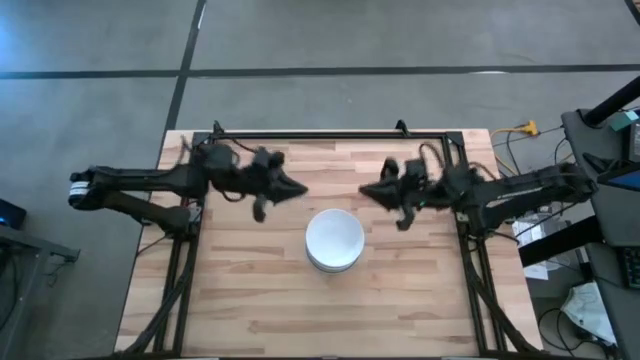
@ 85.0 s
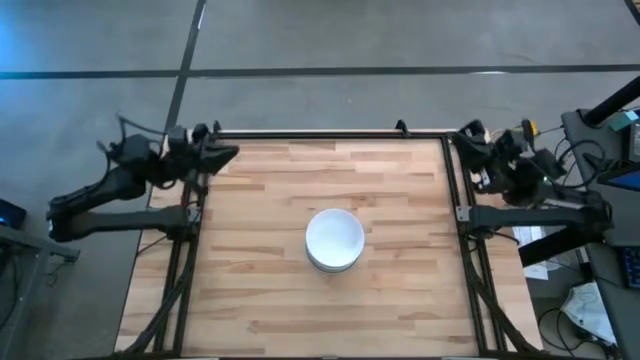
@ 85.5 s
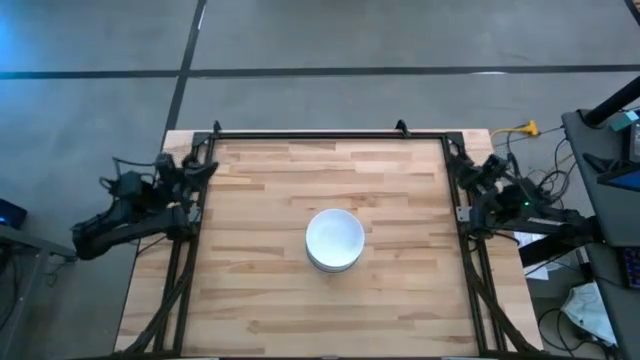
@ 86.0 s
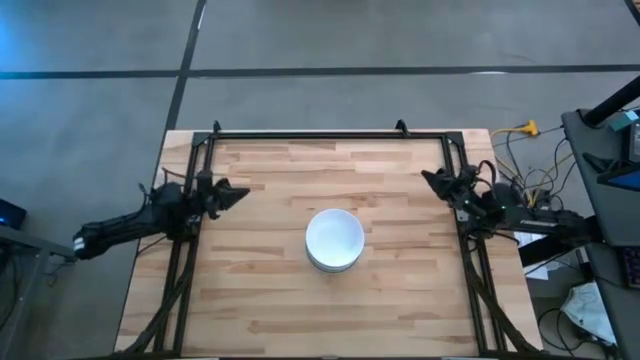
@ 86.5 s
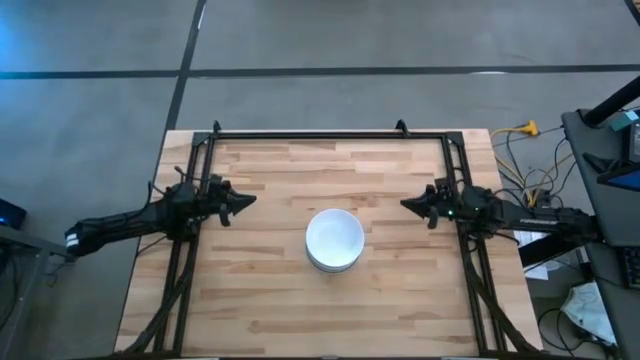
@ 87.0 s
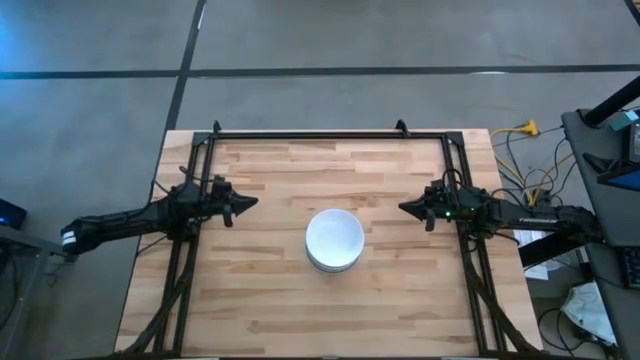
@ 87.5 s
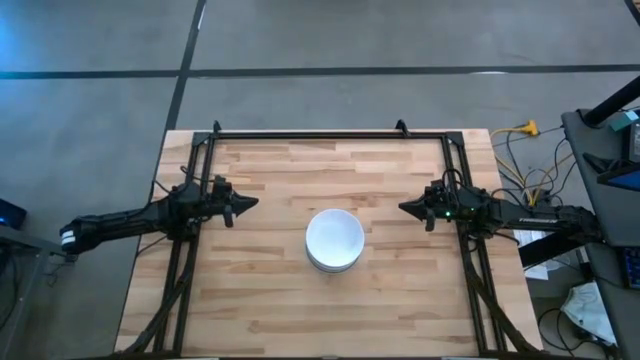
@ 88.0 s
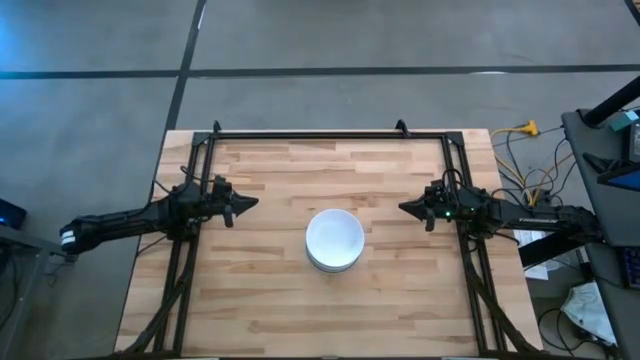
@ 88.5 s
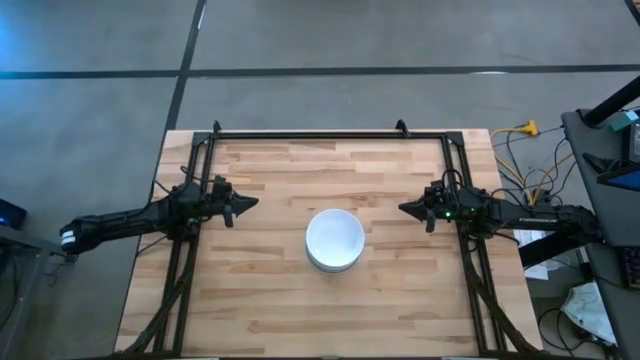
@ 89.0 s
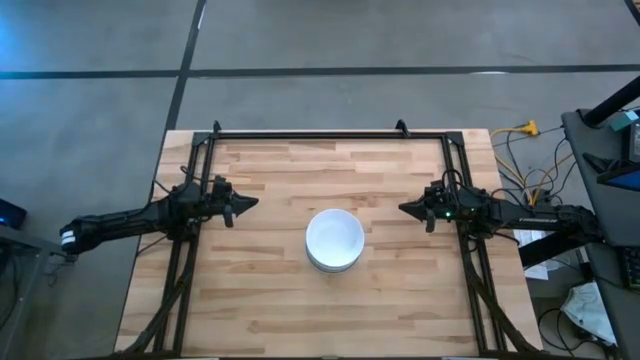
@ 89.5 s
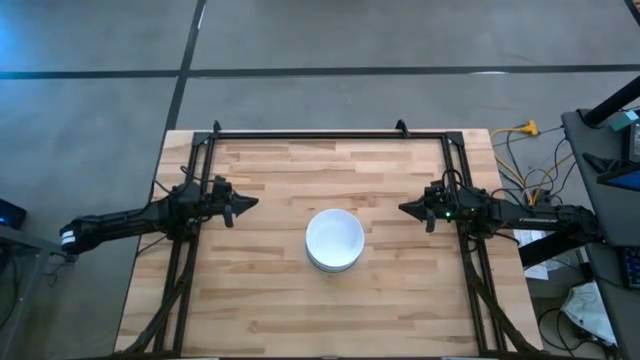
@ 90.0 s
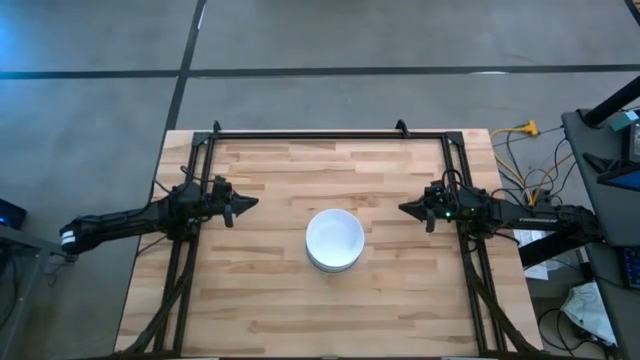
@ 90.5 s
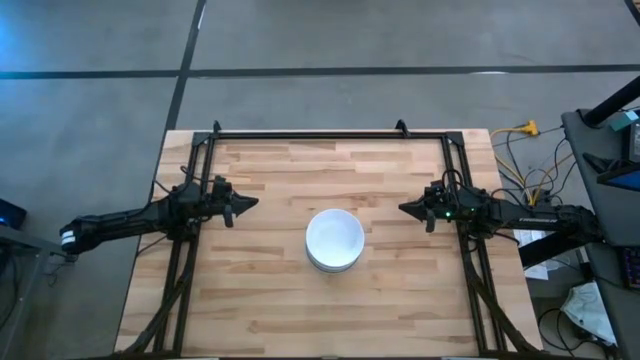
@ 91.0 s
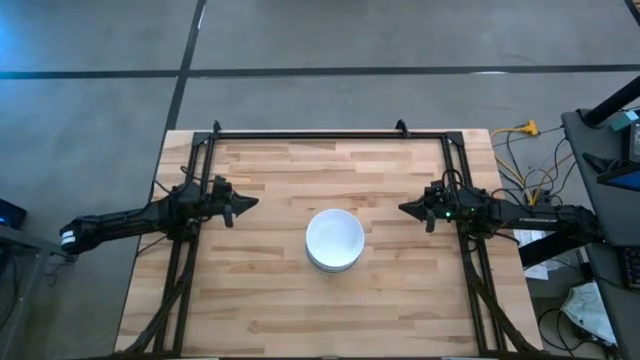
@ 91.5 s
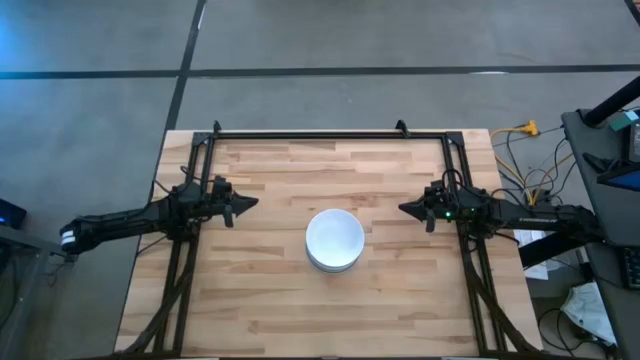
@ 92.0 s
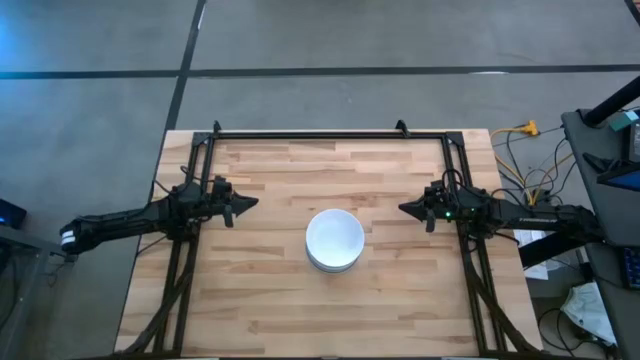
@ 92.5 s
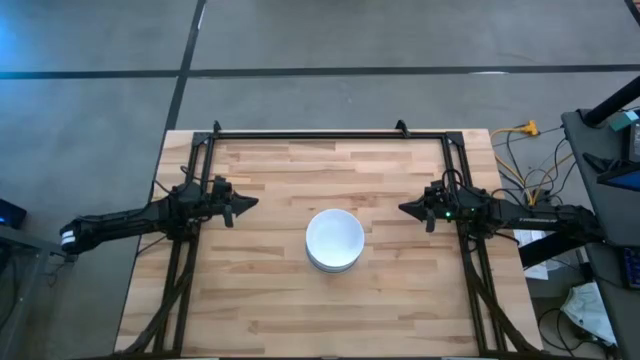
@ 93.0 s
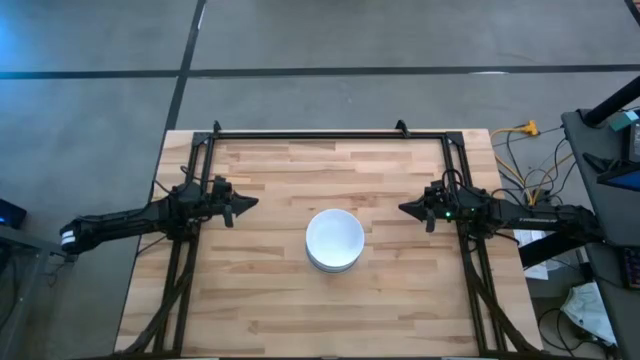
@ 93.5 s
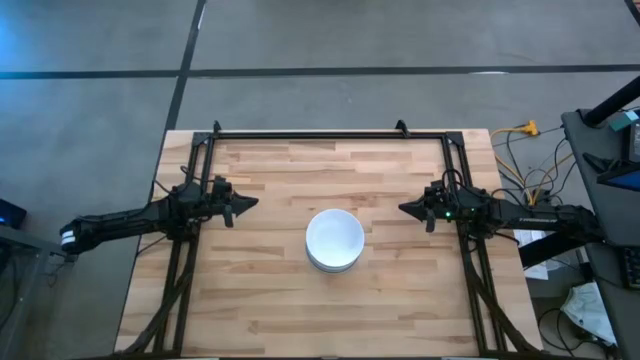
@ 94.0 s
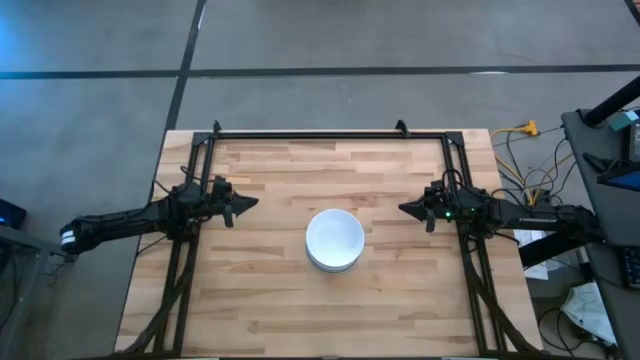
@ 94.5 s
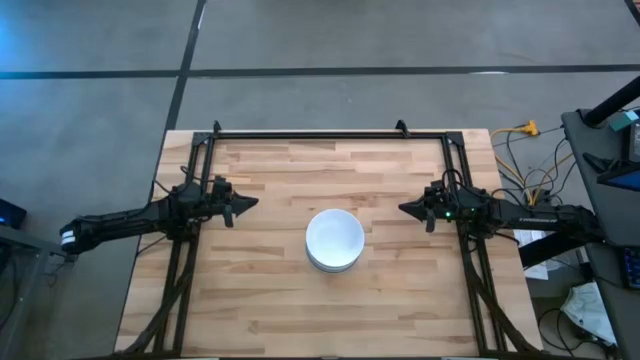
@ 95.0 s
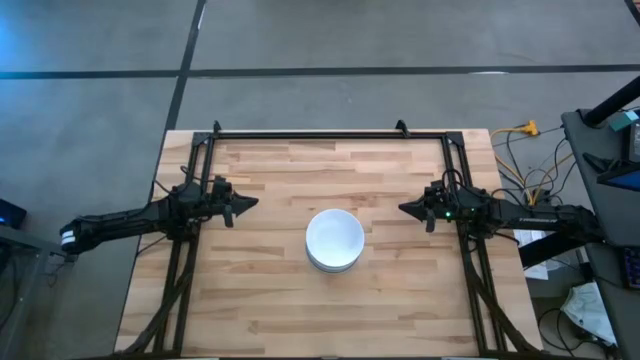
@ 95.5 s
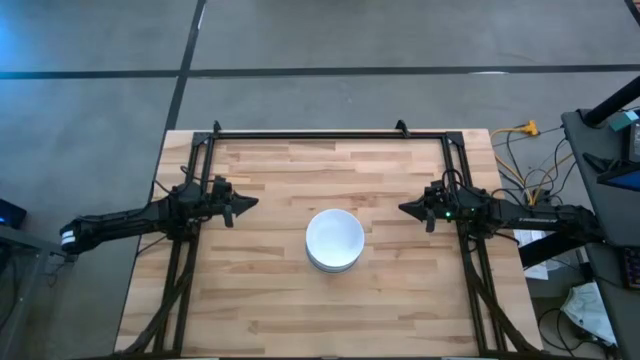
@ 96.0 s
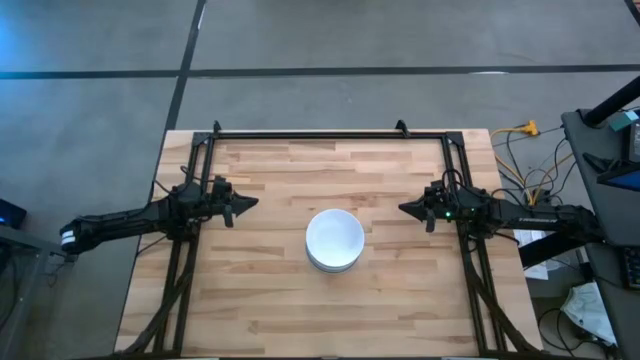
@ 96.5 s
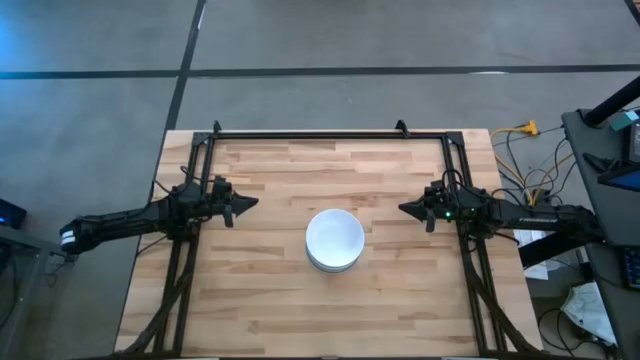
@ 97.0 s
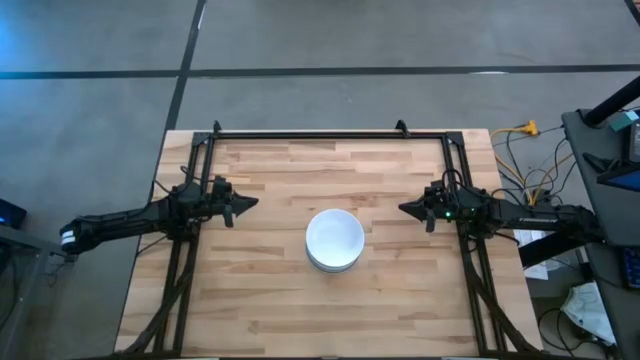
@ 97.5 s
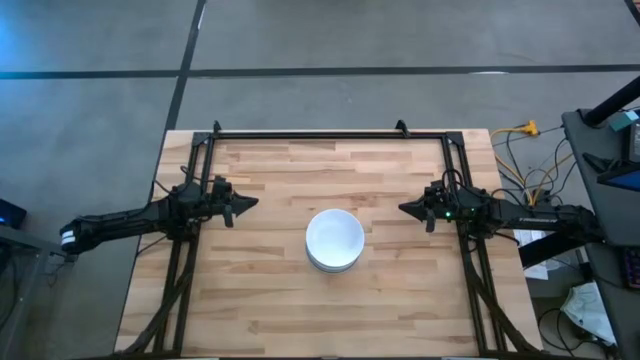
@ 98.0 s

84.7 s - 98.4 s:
Task: Nest bowls inside each other
Return to Home Position

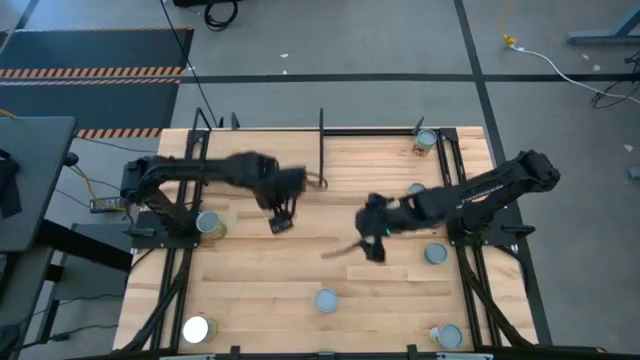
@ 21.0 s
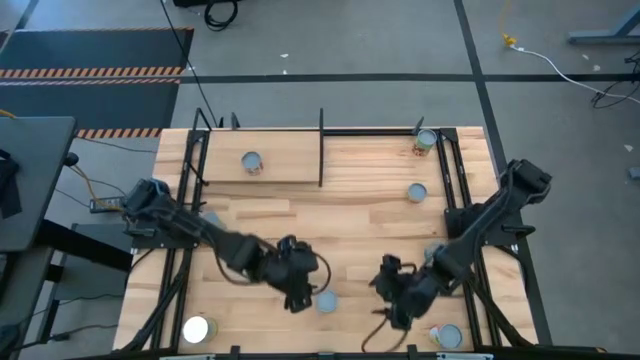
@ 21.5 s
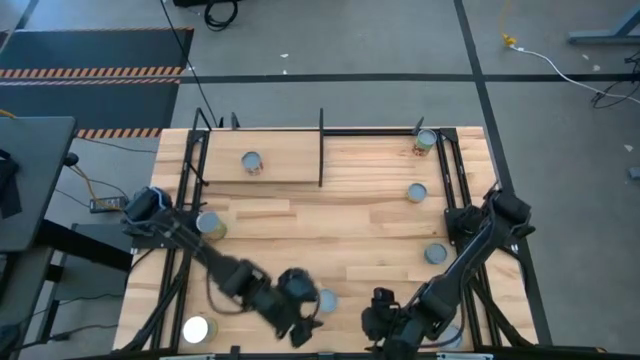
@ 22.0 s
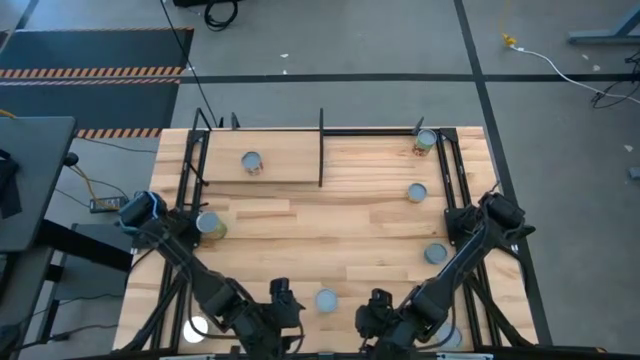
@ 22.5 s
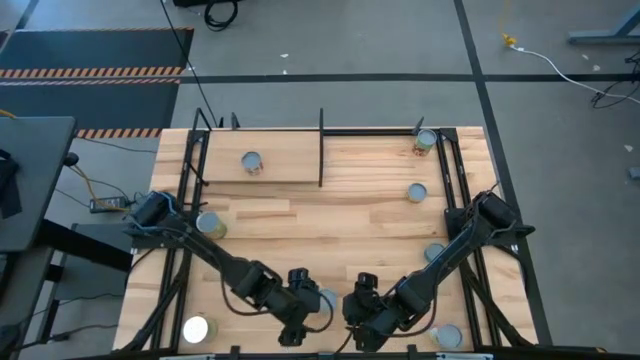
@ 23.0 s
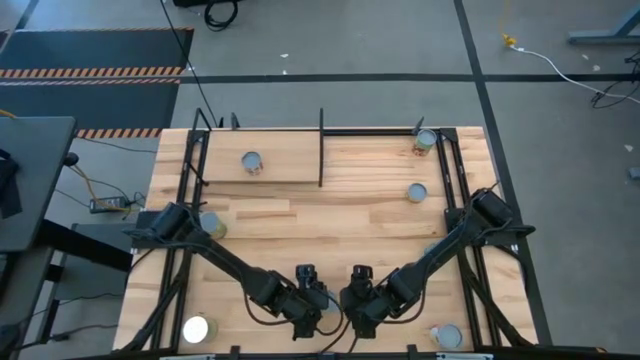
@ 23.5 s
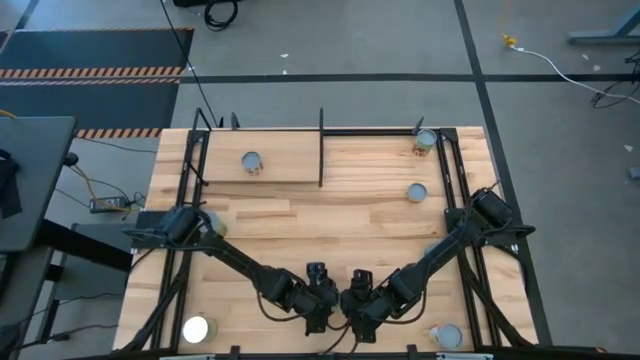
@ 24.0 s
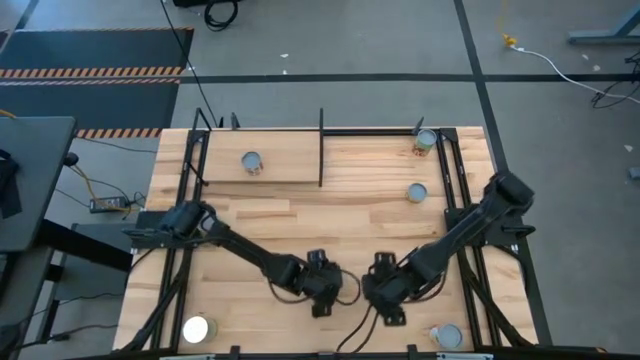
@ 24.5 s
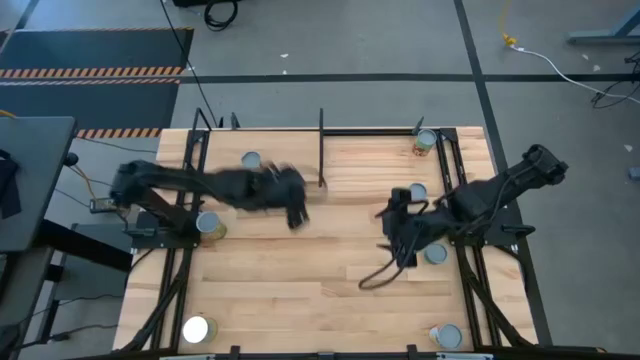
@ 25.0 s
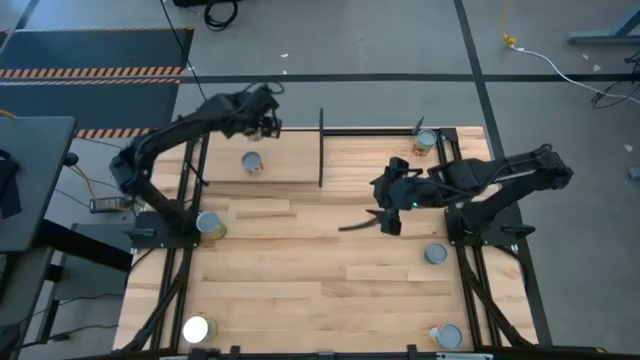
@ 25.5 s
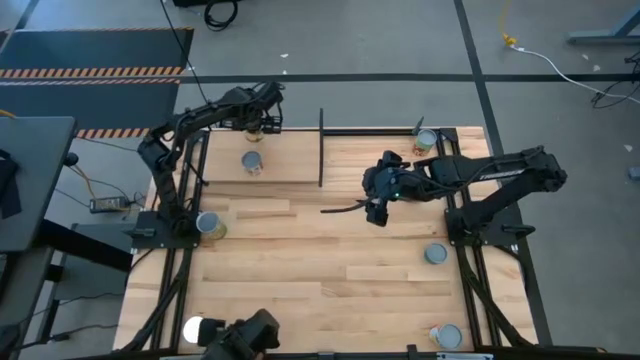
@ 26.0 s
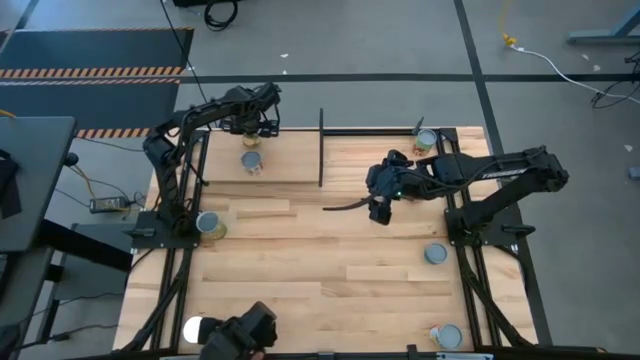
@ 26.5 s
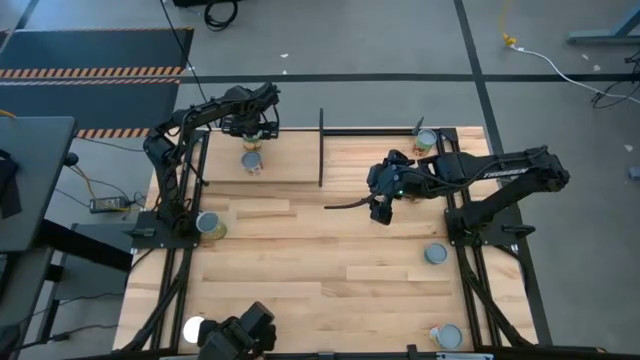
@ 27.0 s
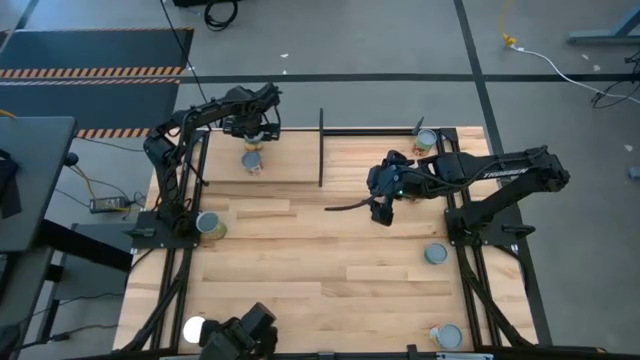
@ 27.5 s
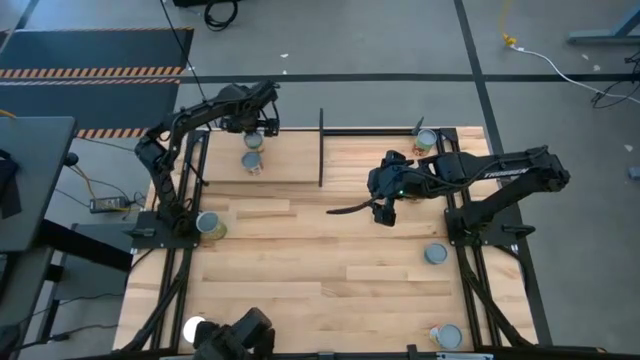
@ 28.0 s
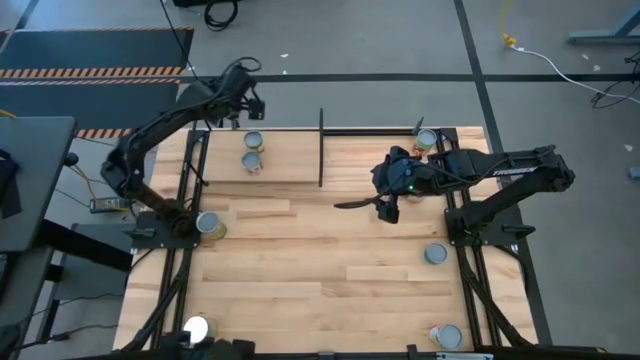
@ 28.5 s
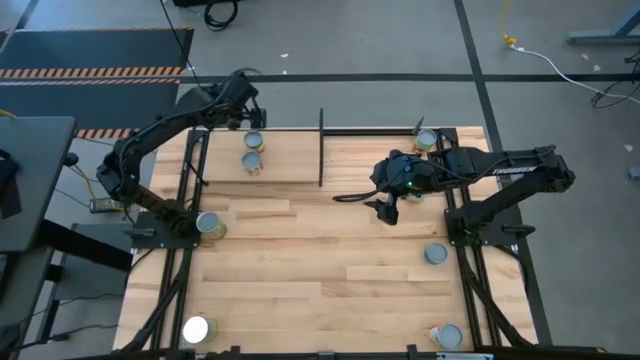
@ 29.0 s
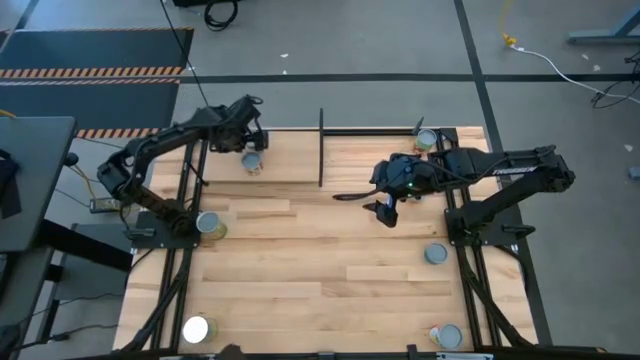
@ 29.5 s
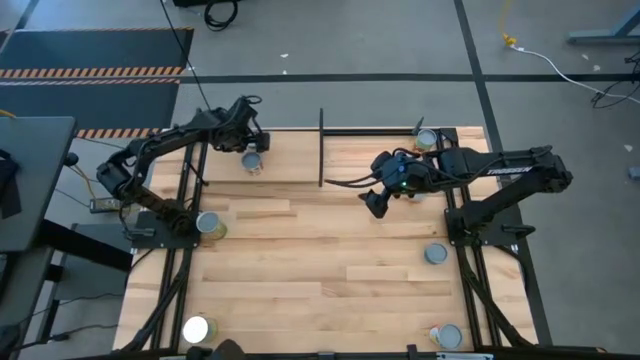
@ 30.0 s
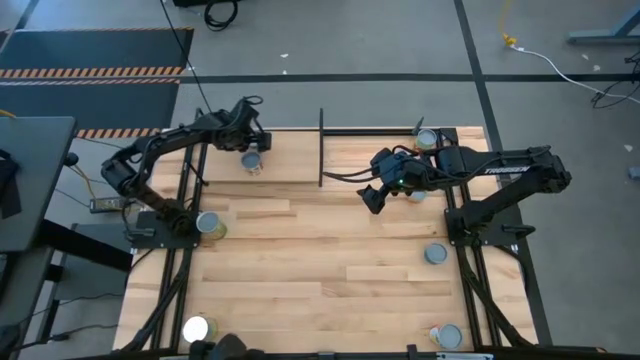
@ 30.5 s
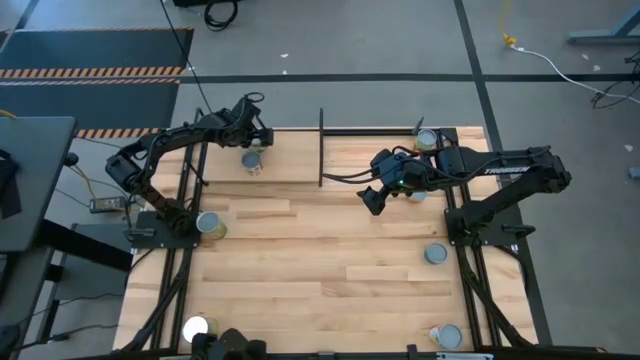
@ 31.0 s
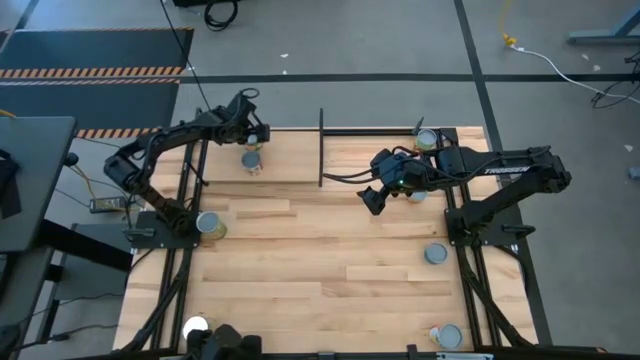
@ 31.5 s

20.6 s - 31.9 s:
Task: Pick and place cans onto a shelf
Put the canned sliced peaches on the shelf aligned with the canned diced tomatoes
